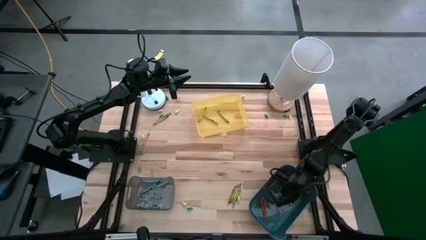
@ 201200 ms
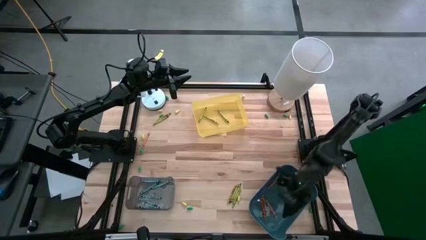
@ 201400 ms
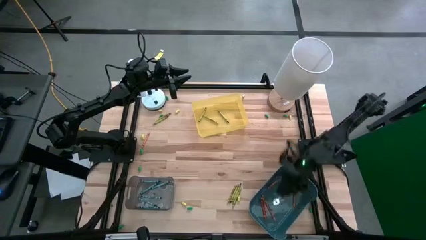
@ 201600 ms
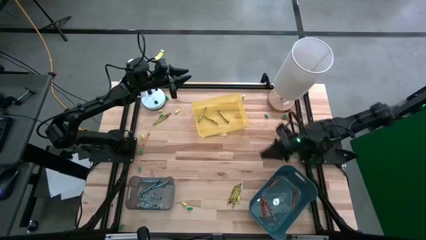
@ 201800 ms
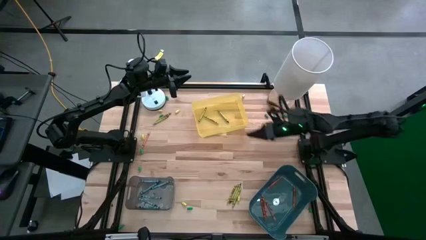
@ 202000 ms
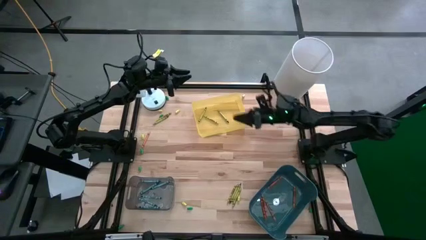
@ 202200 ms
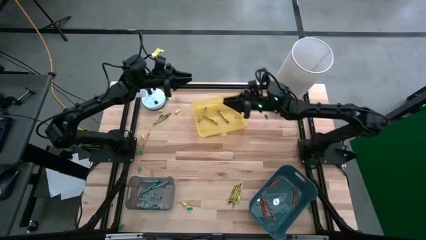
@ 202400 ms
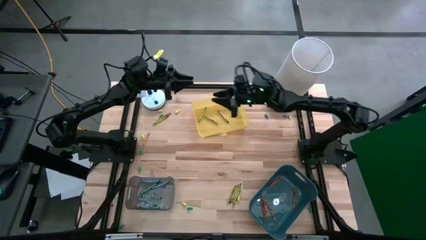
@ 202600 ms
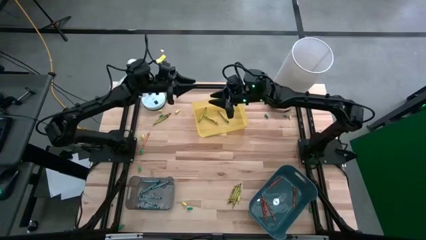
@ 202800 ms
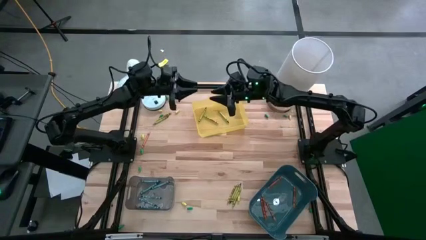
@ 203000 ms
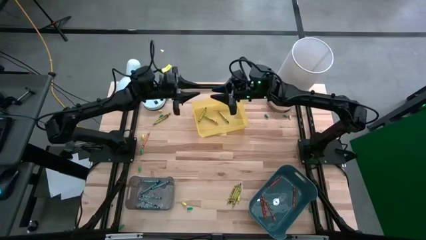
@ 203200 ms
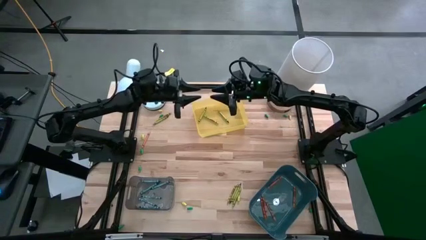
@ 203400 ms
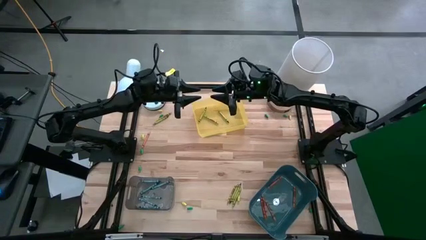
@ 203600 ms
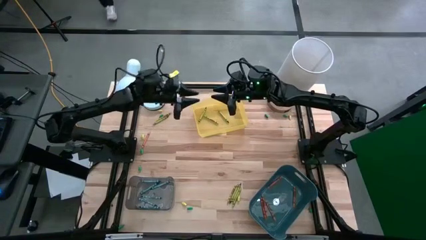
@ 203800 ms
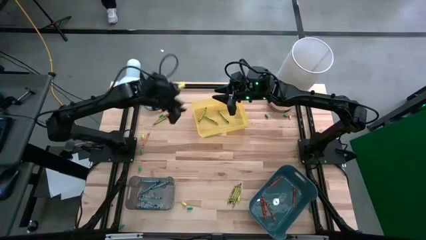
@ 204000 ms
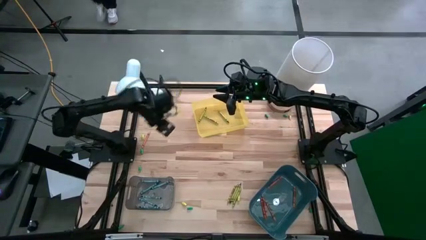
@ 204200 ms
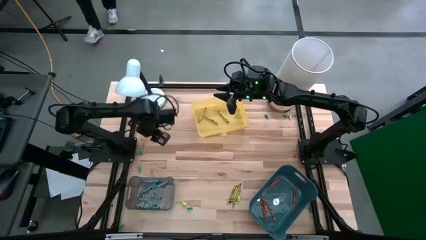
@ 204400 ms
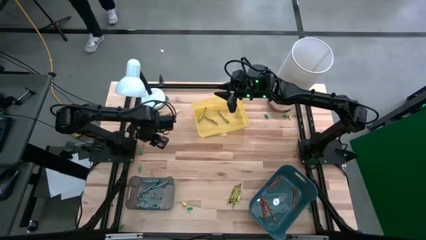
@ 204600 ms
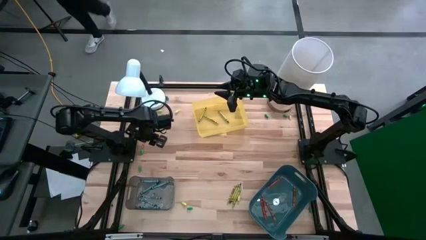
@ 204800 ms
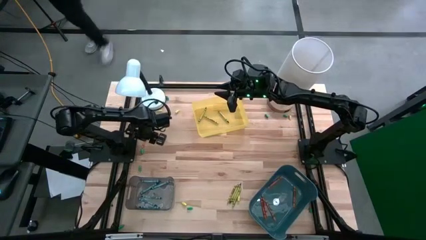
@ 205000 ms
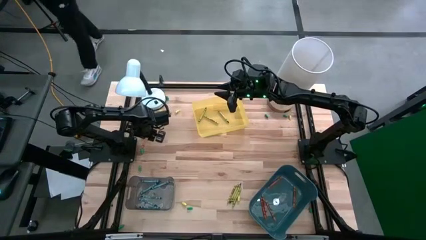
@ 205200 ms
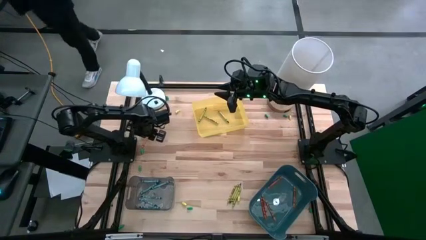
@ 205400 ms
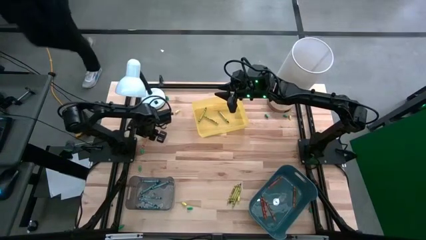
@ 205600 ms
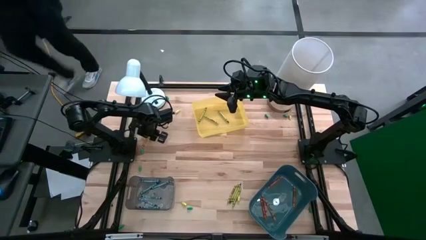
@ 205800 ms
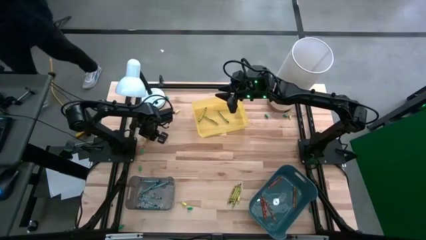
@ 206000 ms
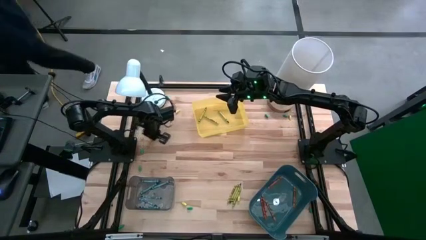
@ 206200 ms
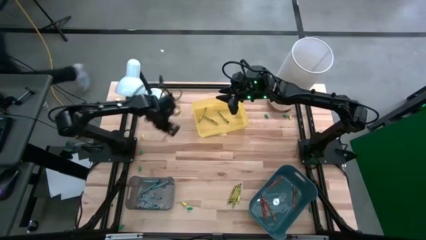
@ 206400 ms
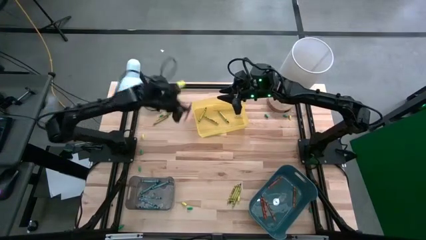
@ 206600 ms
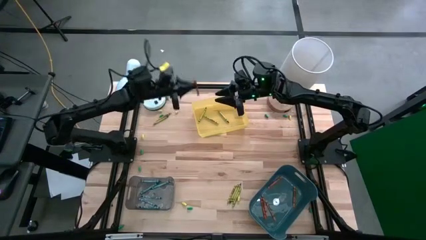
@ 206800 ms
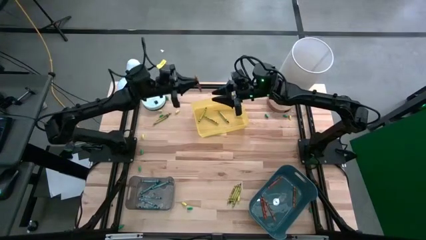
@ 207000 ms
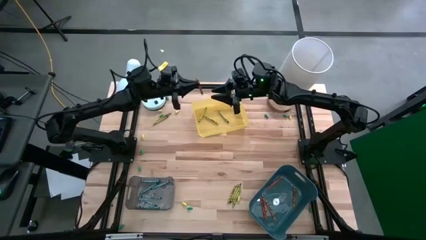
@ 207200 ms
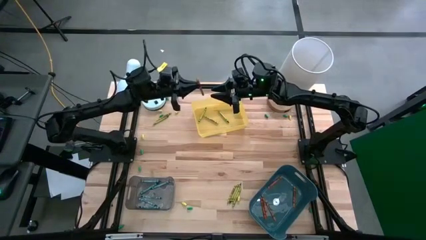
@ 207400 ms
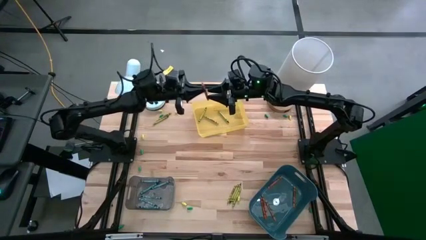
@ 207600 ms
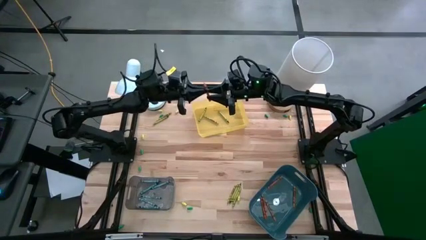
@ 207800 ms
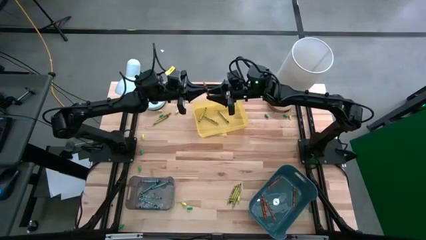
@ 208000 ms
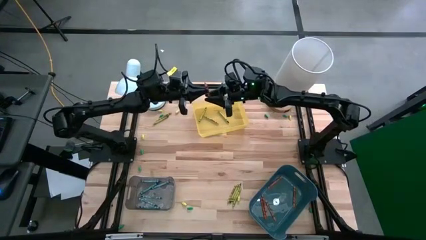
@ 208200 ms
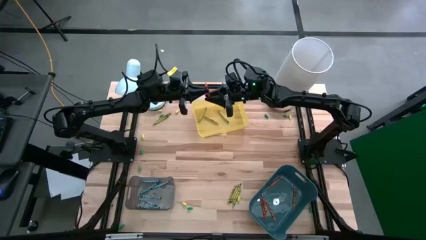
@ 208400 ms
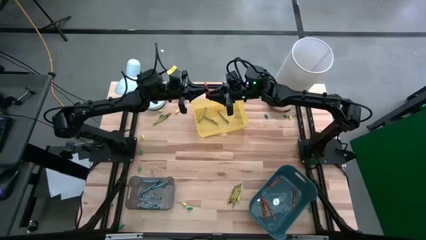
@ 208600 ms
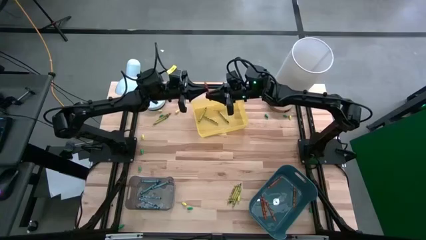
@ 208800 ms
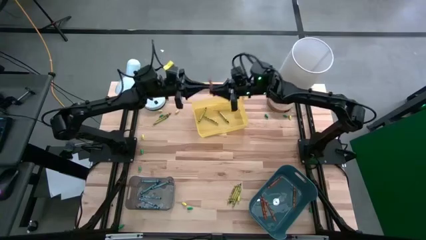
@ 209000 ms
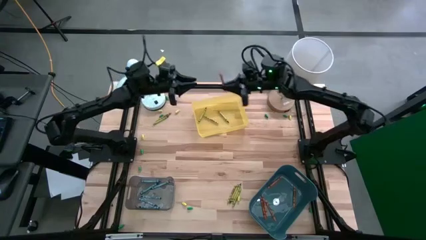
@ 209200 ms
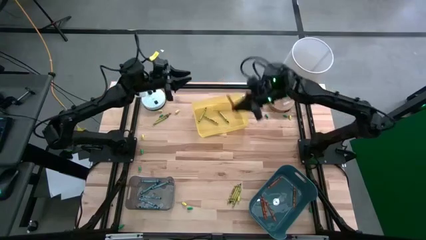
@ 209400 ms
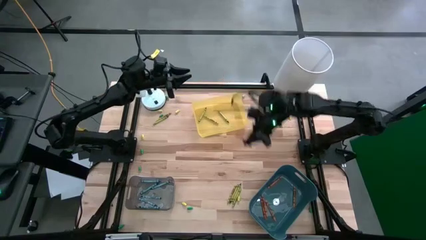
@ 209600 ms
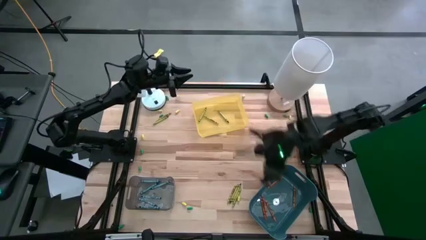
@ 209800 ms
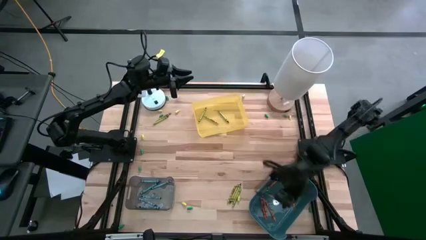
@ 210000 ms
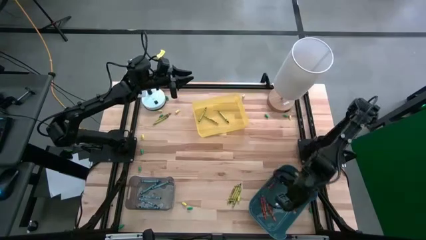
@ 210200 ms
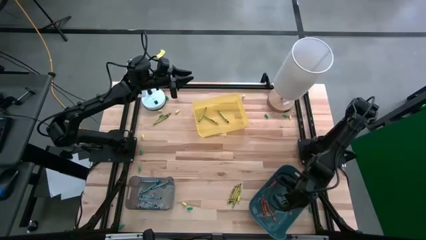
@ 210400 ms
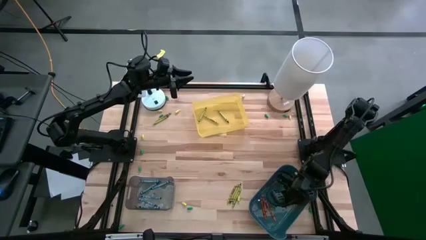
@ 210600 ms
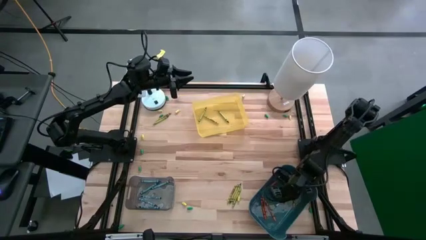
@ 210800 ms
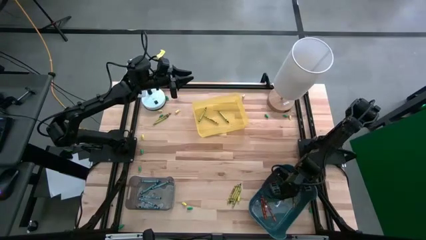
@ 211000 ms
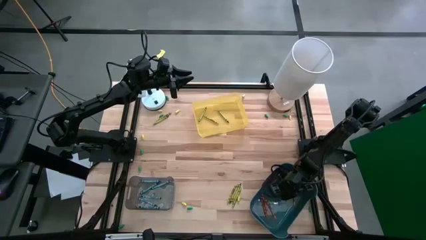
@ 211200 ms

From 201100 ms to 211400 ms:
Task: Sort crayons
Put the orange crayon into the green bin

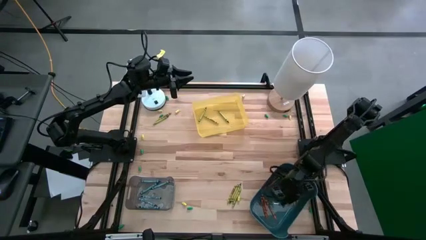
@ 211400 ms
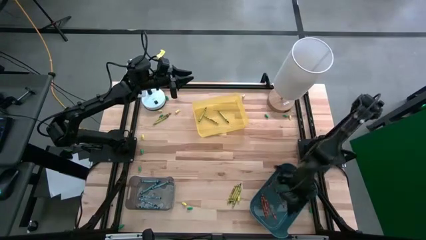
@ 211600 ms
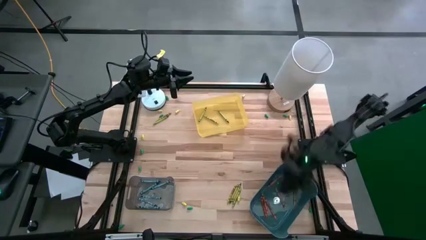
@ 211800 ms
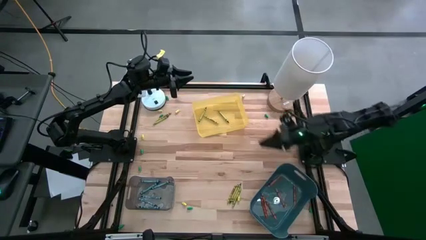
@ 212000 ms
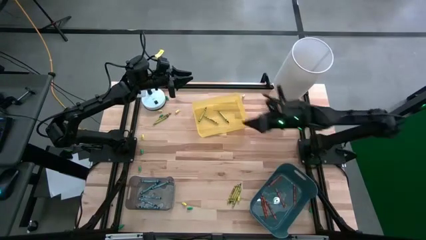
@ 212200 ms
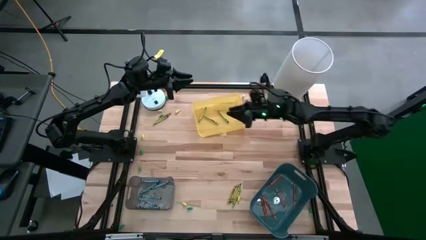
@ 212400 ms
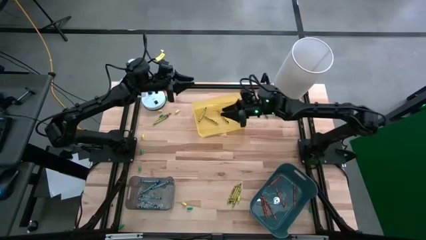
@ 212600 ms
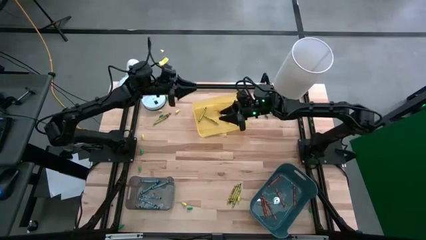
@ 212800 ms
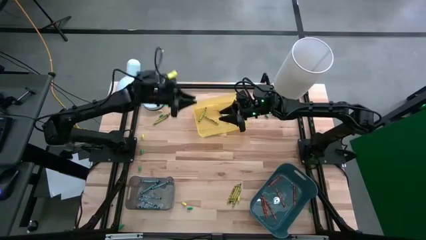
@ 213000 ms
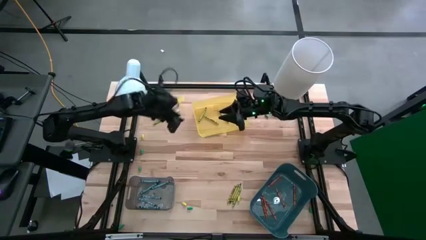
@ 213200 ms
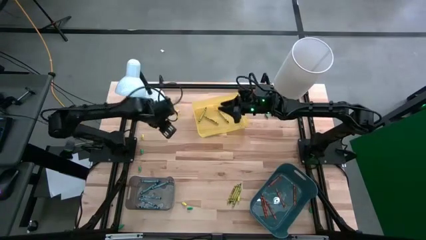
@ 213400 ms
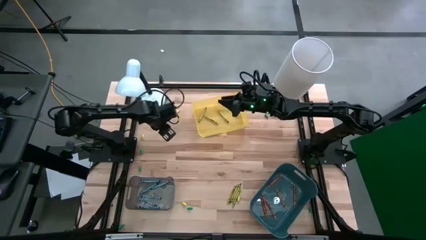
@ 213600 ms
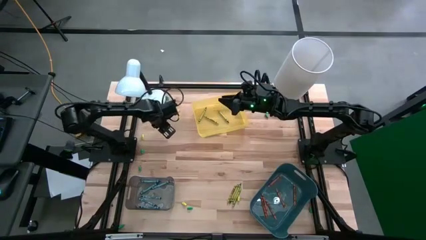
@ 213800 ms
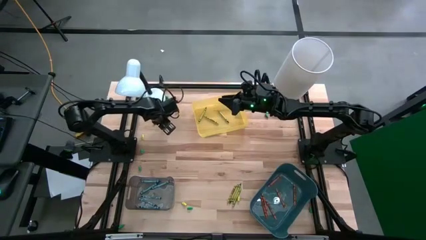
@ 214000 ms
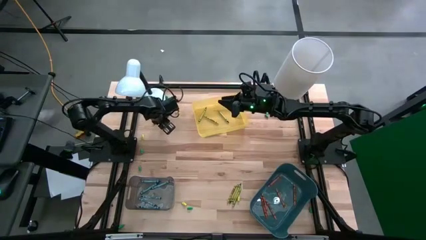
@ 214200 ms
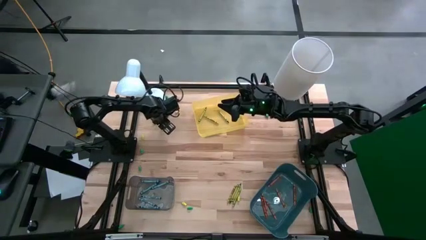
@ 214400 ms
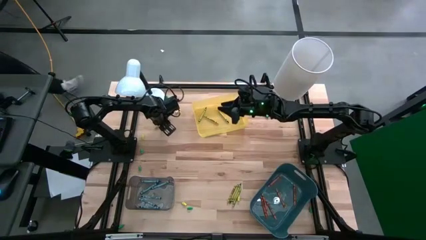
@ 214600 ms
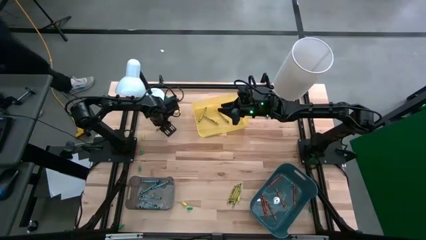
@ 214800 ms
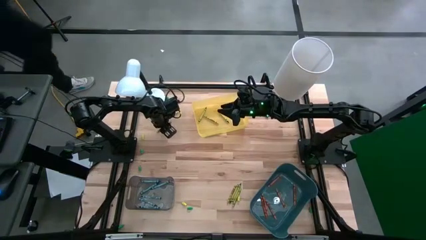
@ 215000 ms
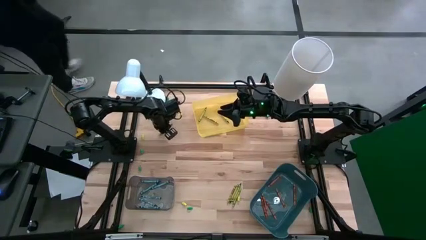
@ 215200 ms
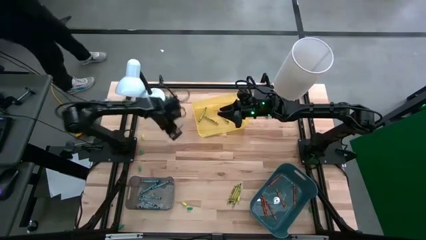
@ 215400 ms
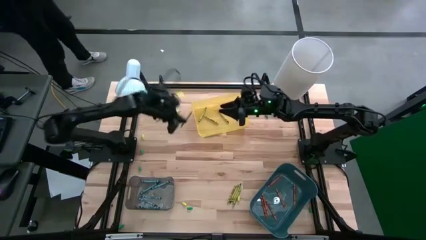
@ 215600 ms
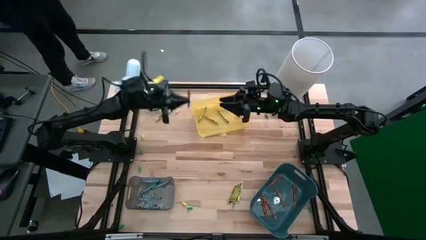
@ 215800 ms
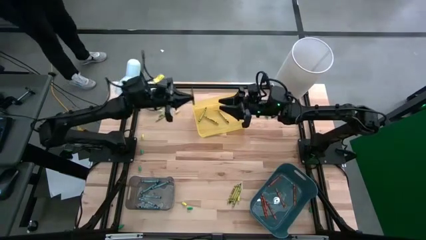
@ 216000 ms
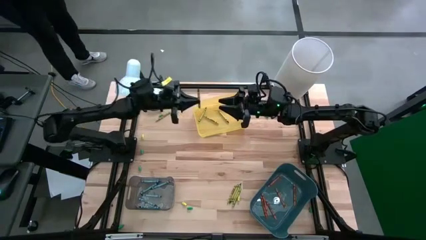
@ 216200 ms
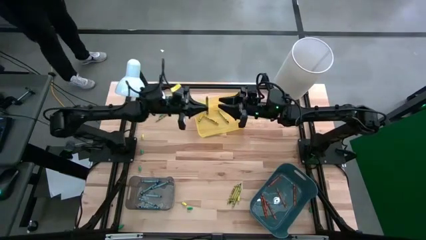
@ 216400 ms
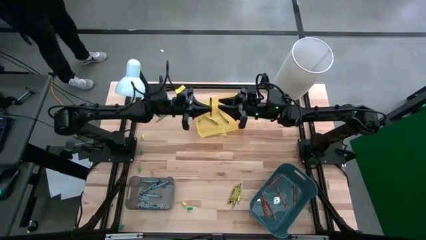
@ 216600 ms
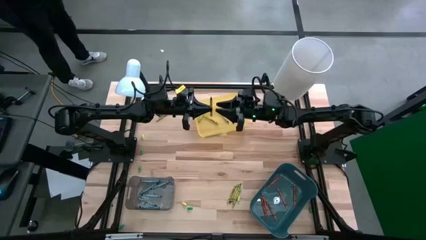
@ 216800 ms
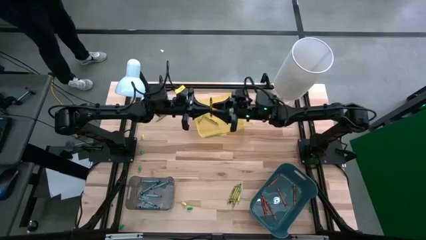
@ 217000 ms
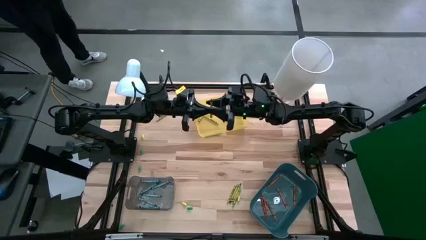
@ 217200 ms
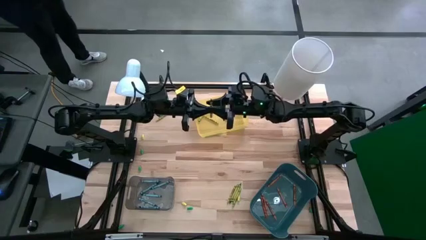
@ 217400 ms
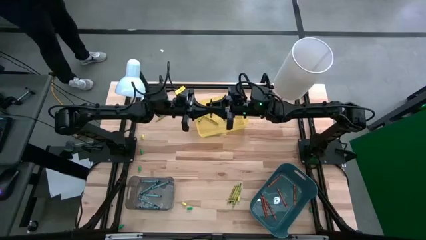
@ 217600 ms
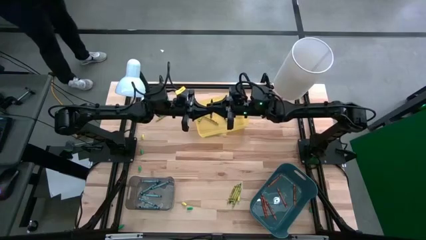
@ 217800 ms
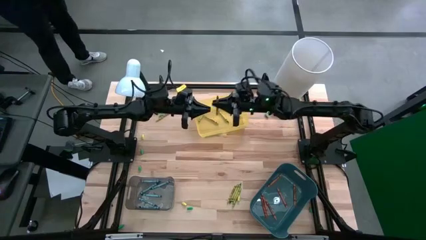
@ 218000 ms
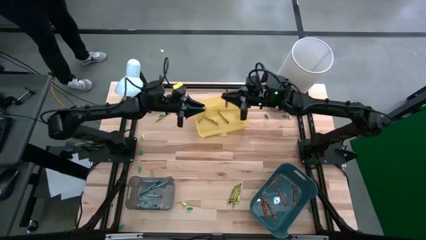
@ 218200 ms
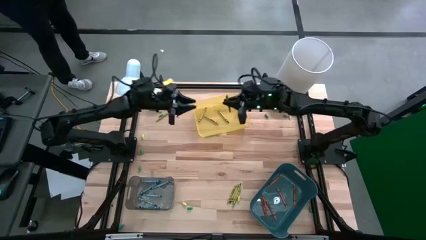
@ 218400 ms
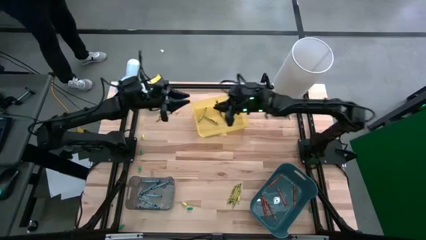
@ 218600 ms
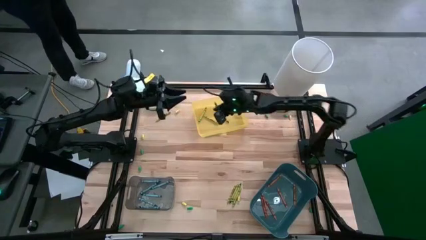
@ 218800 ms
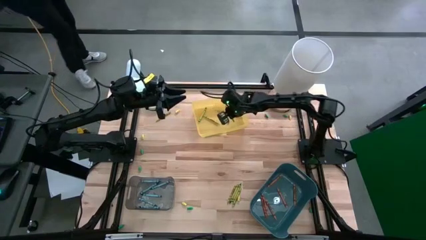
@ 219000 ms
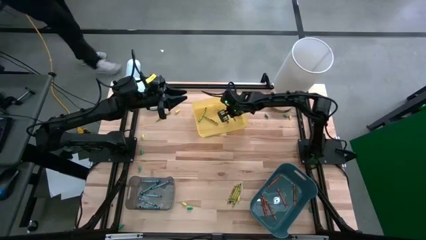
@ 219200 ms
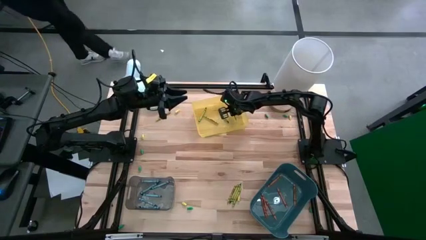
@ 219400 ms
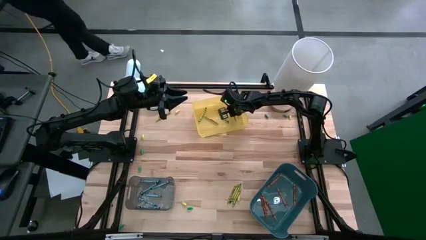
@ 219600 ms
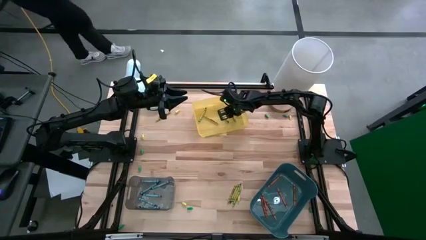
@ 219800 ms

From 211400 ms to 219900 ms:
Put the green crayon into the yellow bin
